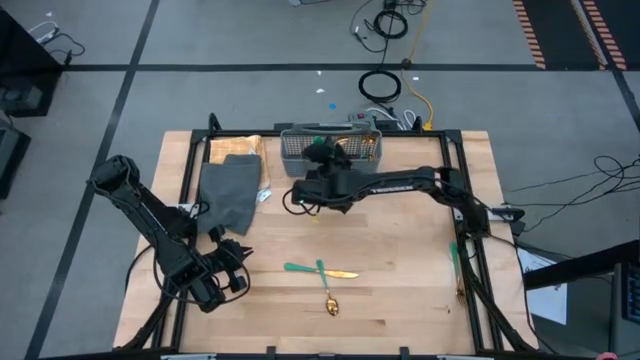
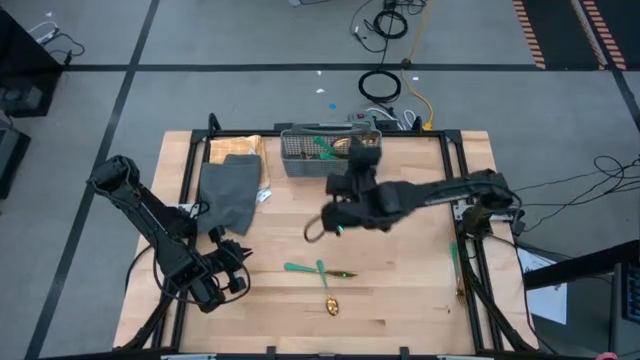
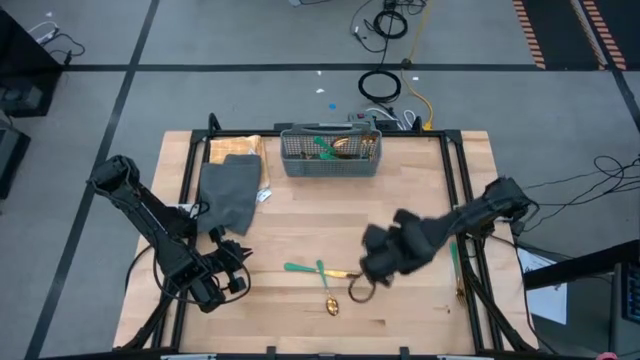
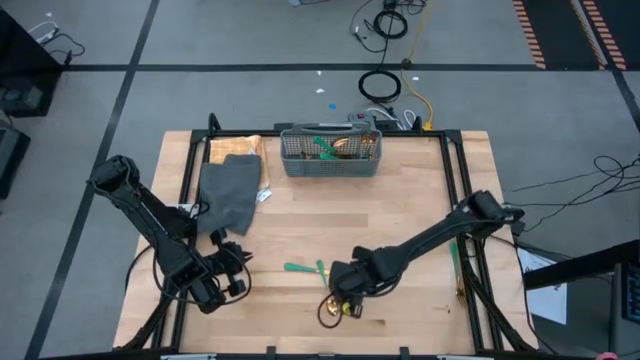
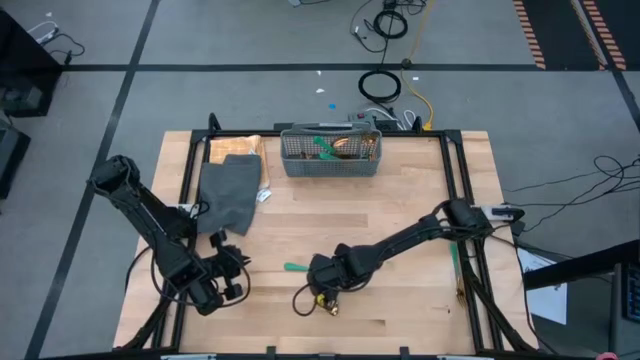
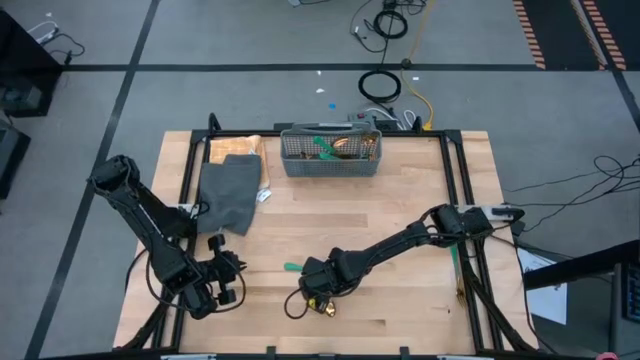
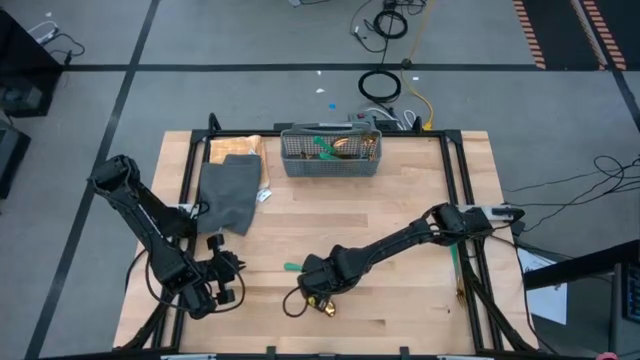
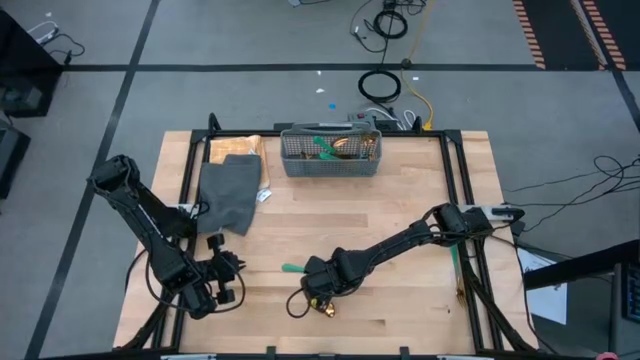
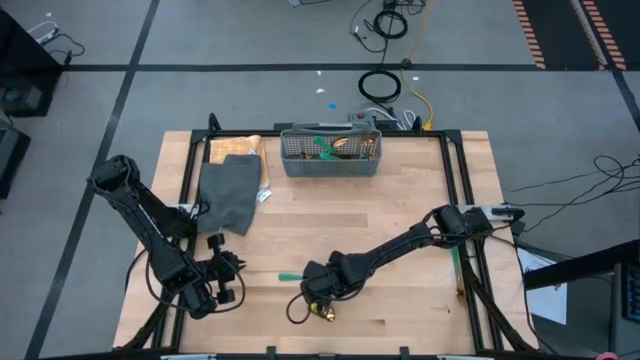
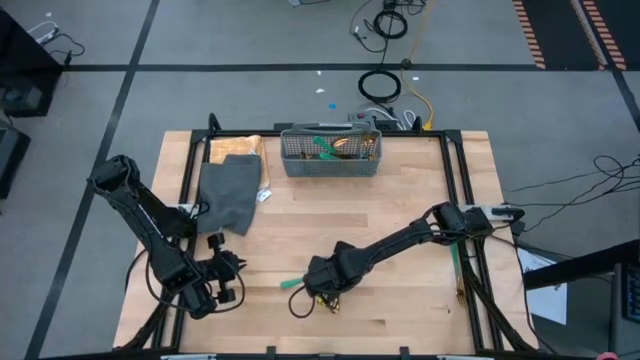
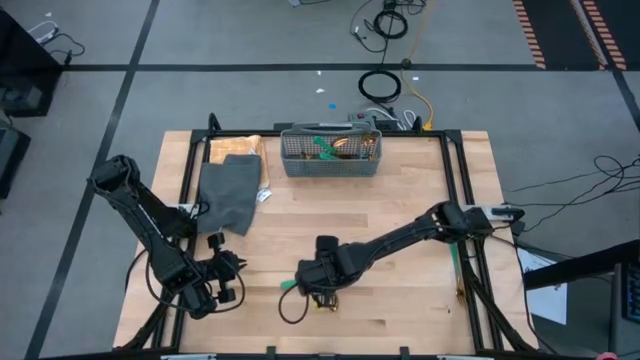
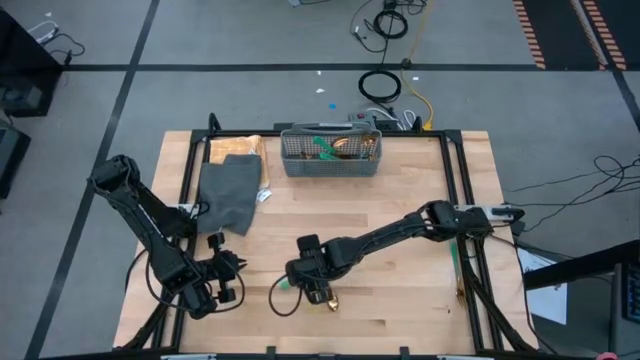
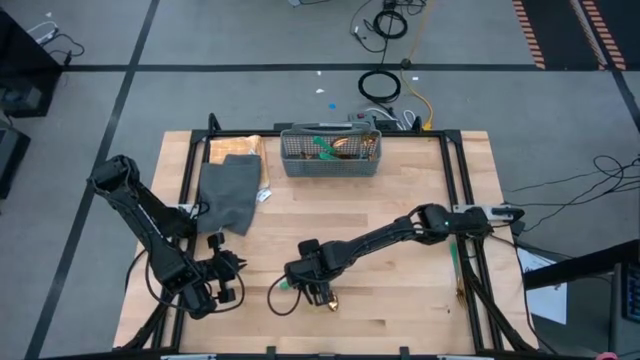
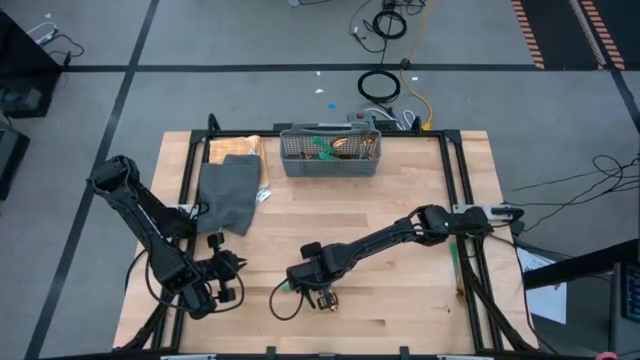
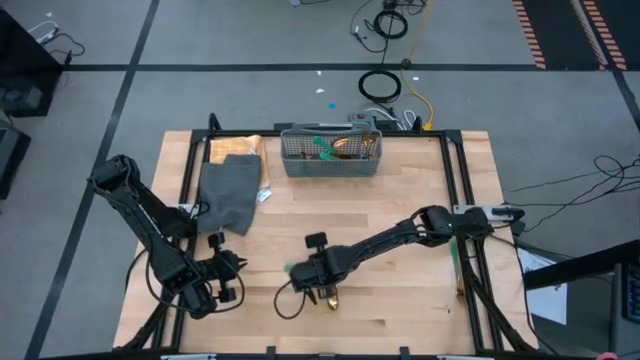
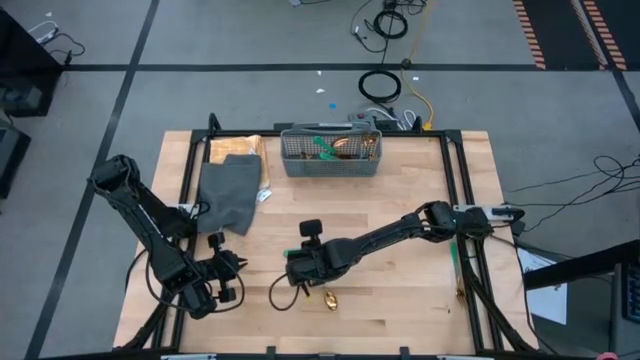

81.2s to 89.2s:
Task: Sort silverware
Put the green knife into the gray silverware basket

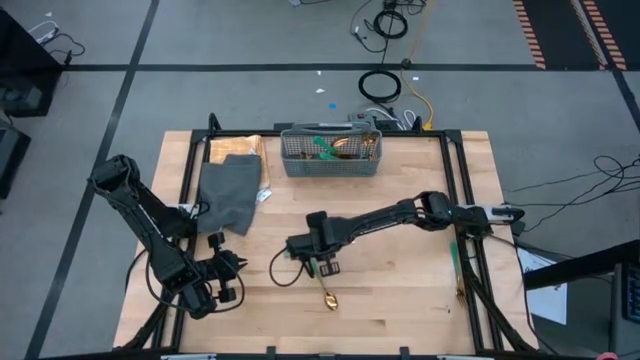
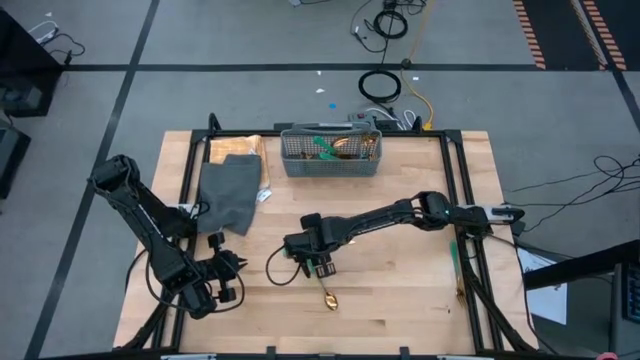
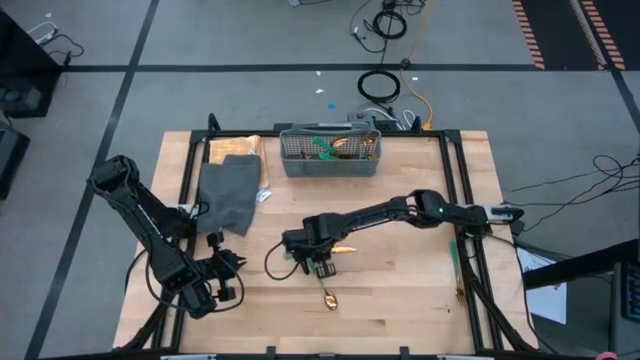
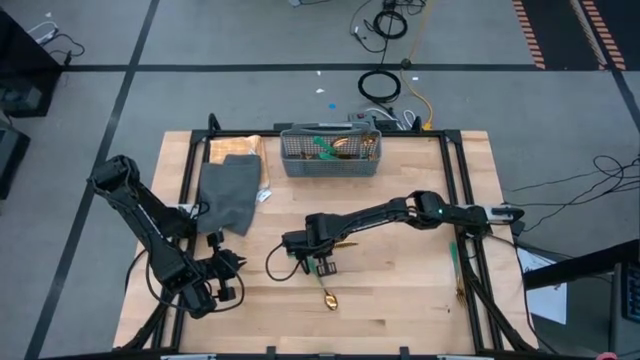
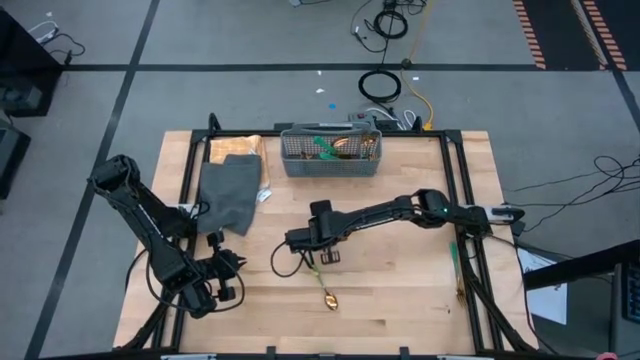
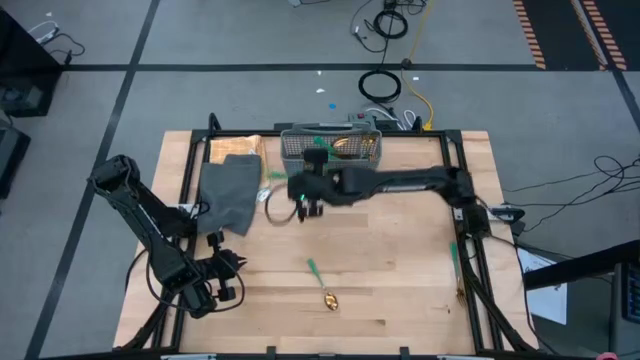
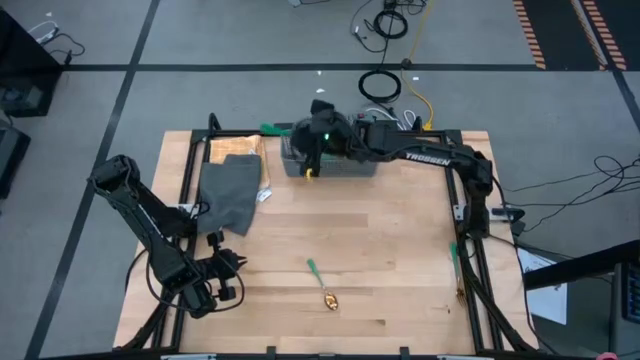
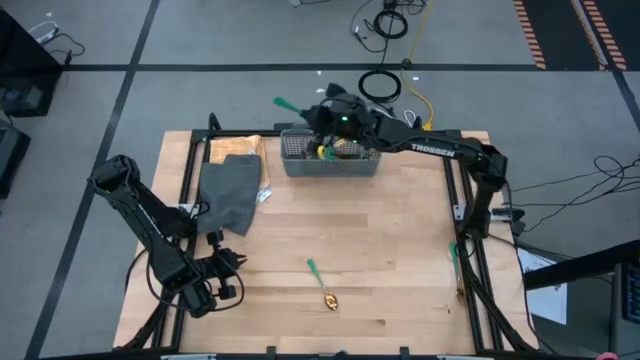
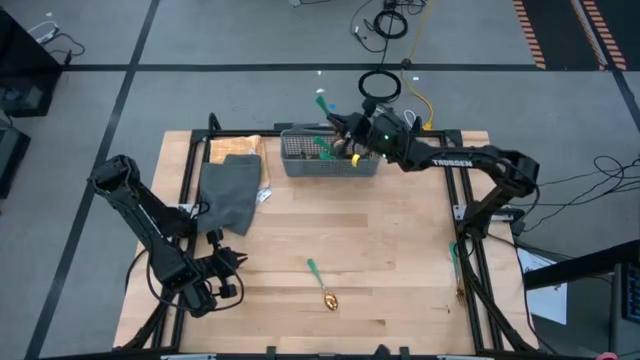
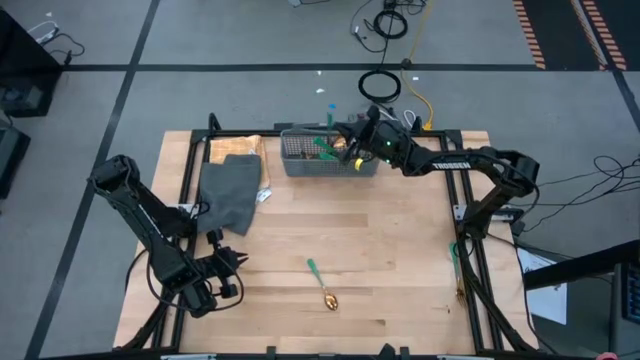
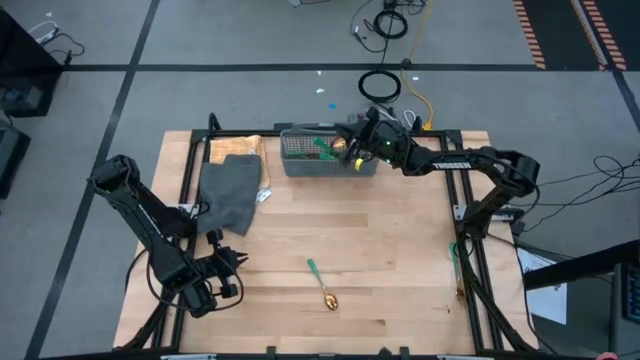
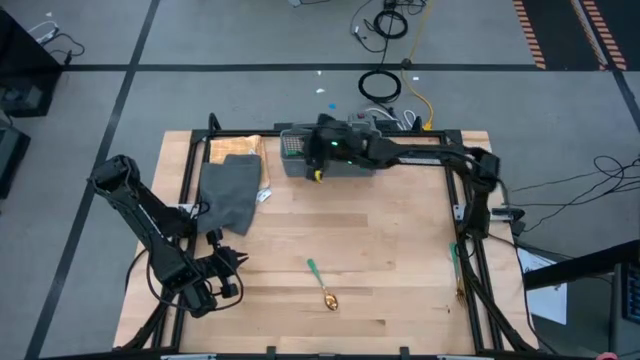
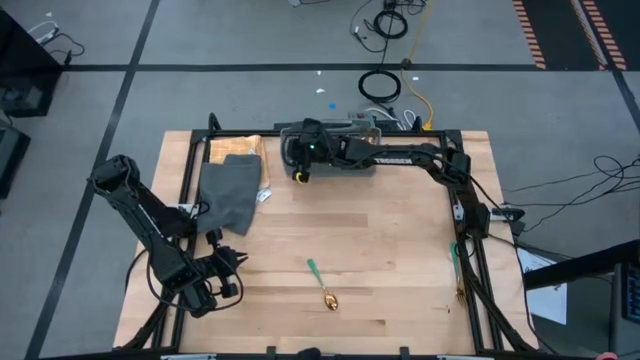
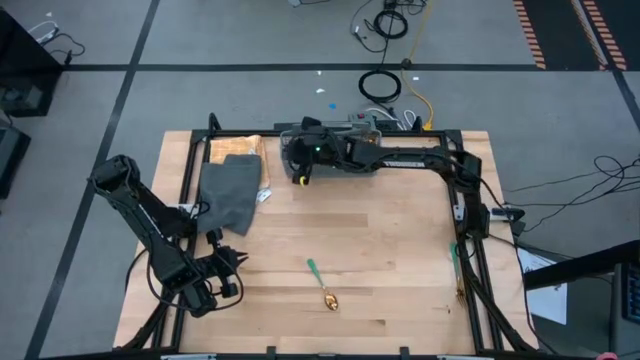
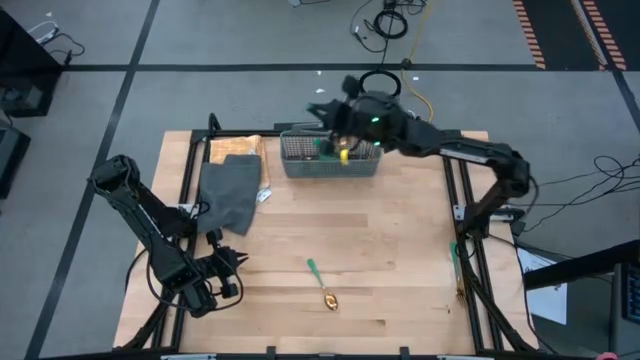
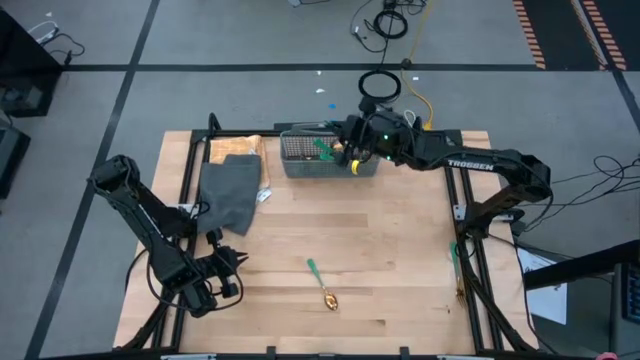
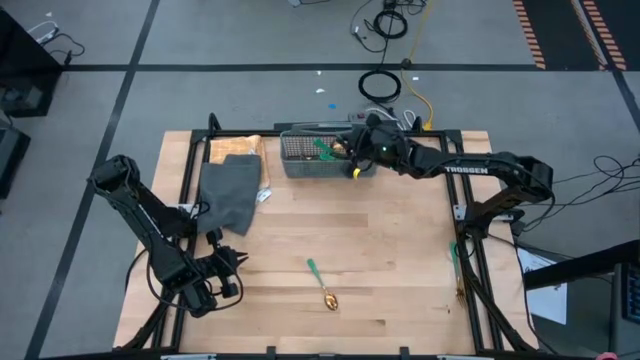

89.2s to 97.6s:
Put the green knife into the gray silverware basket

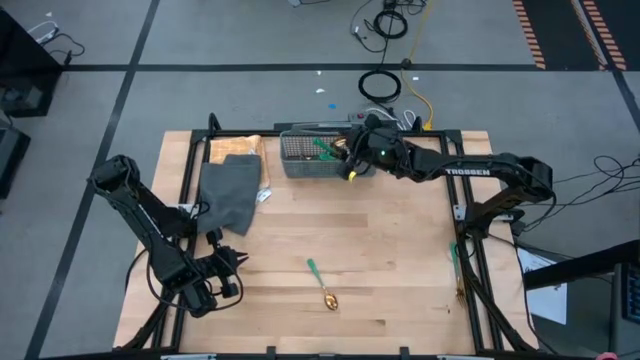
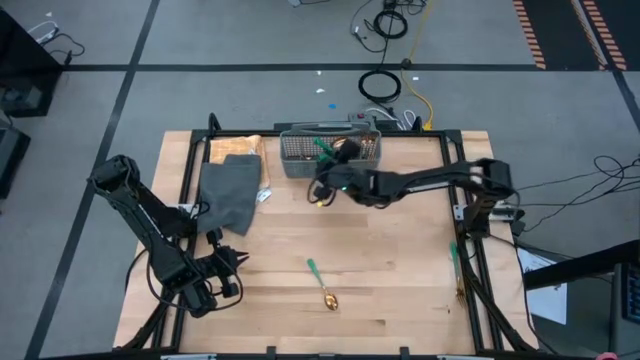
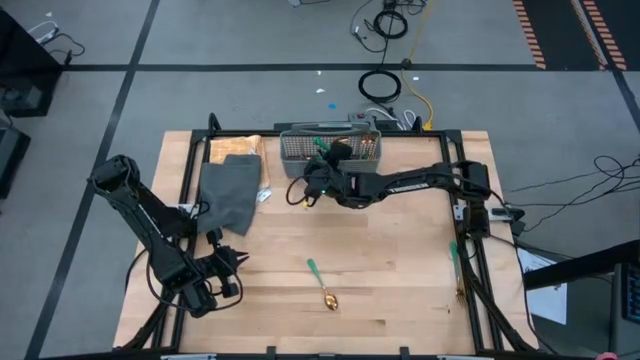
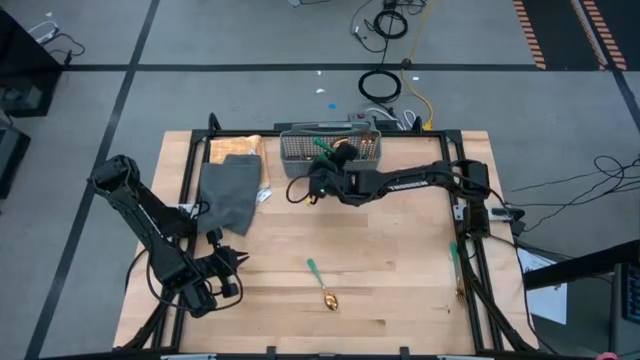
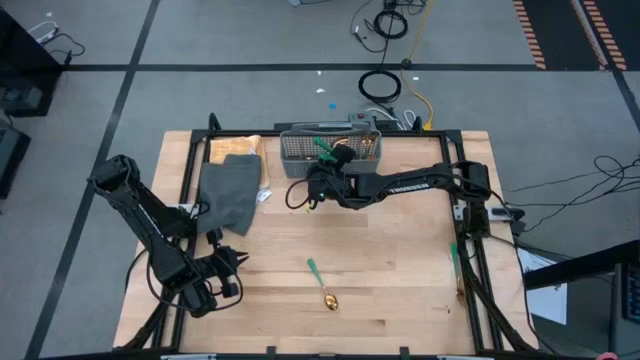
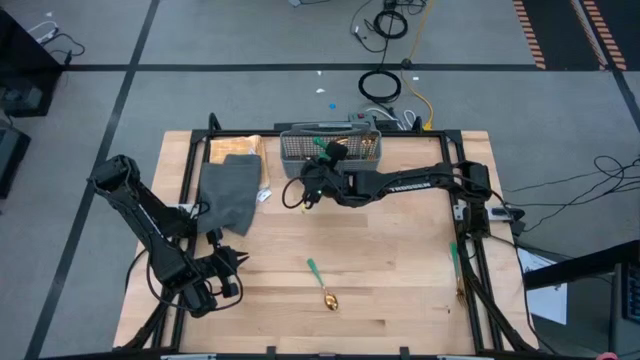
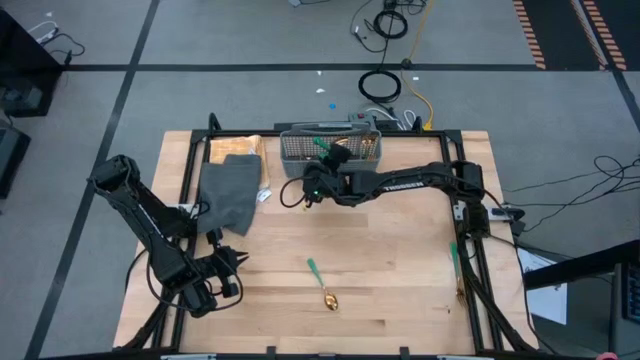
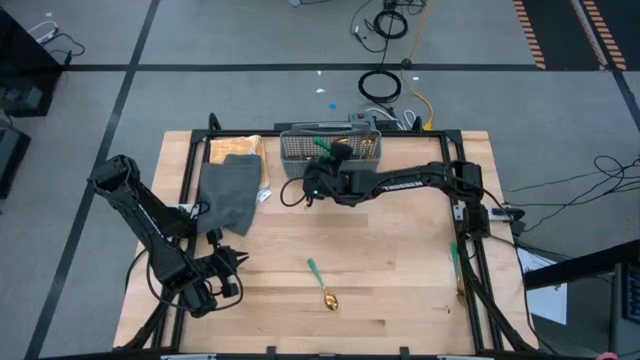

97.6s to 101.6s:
Adjust the green knife into the gray silverware basket
